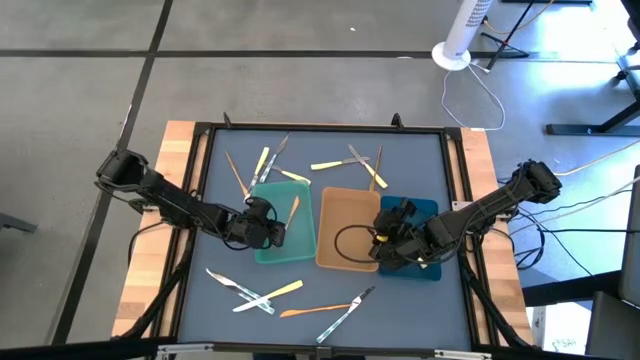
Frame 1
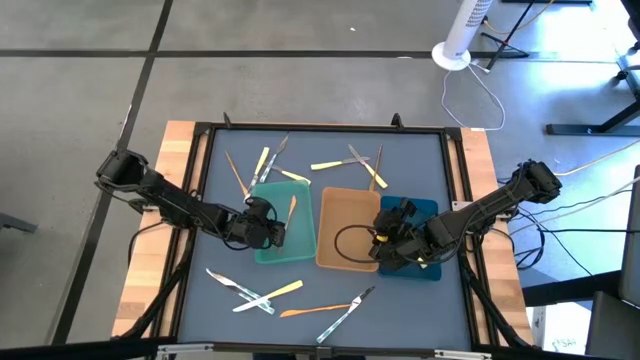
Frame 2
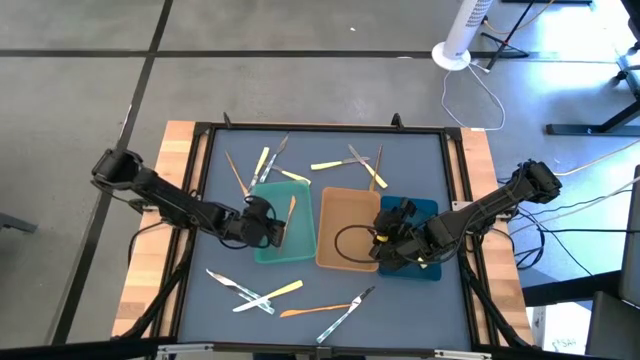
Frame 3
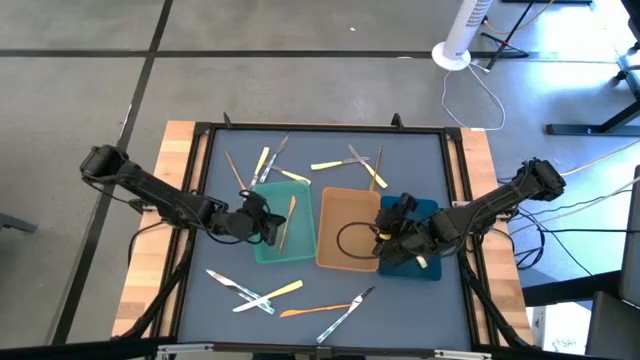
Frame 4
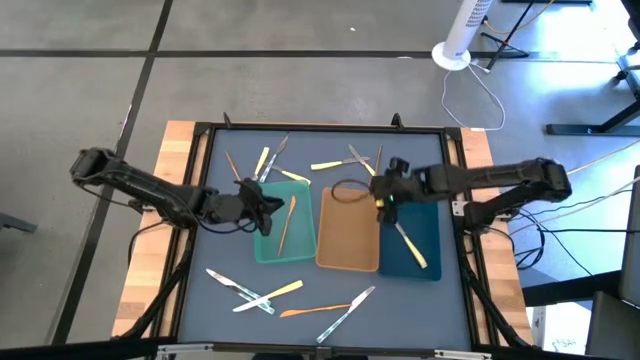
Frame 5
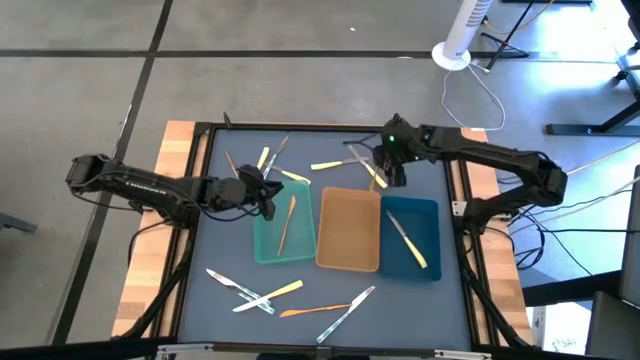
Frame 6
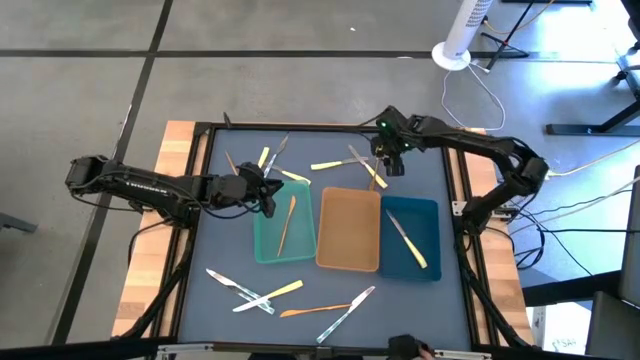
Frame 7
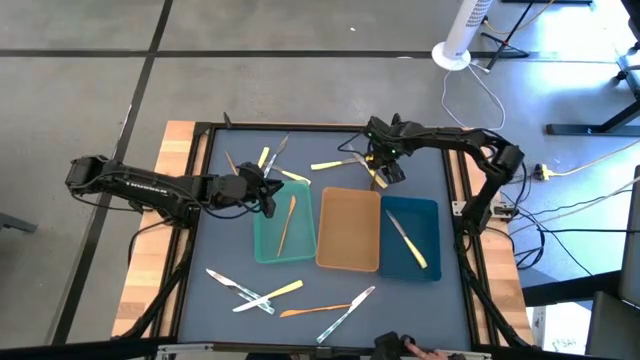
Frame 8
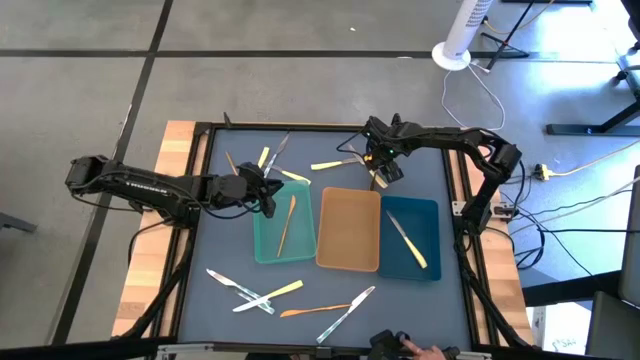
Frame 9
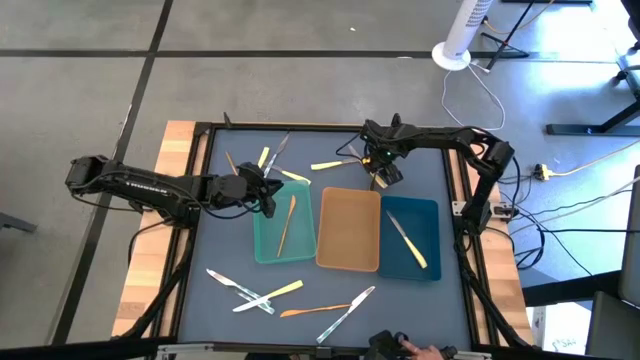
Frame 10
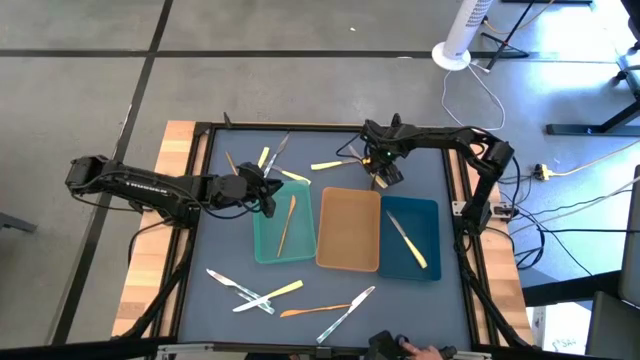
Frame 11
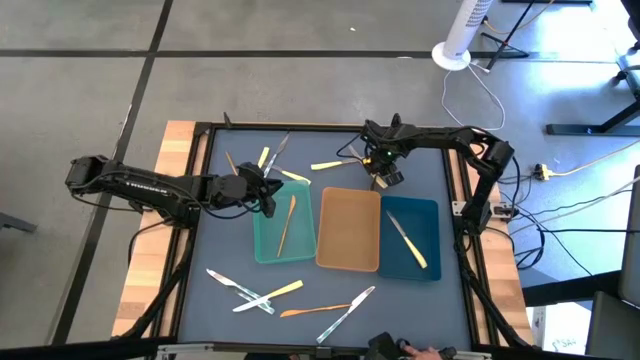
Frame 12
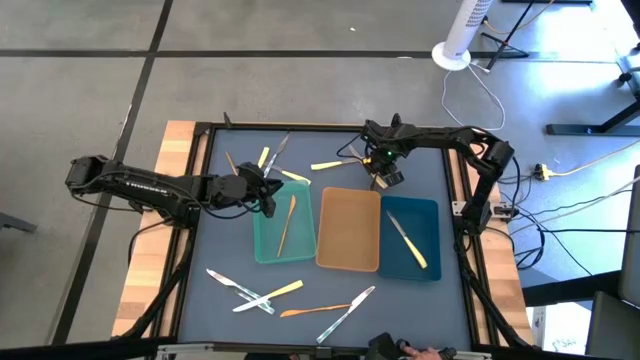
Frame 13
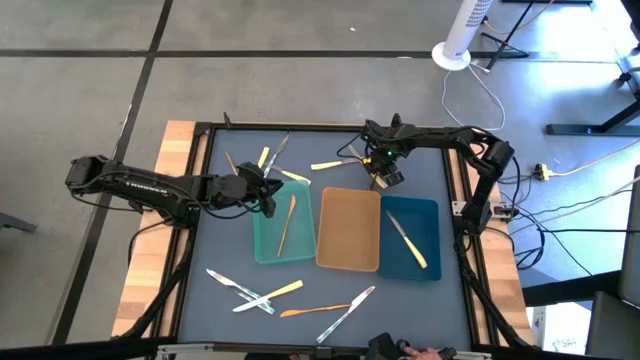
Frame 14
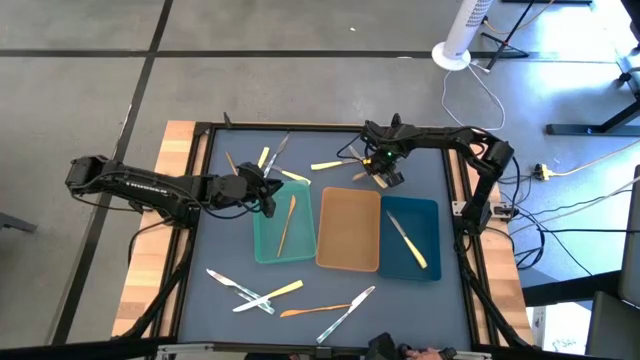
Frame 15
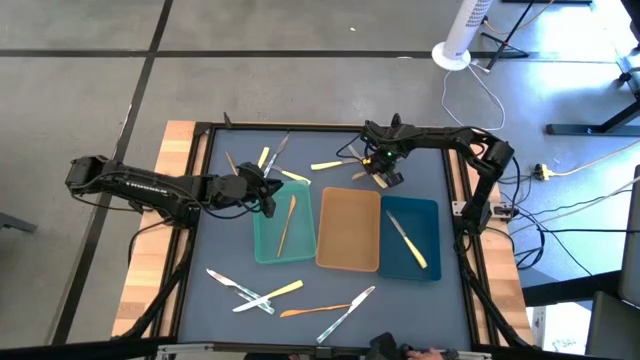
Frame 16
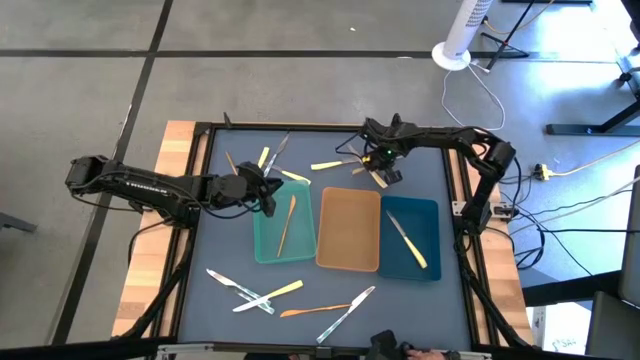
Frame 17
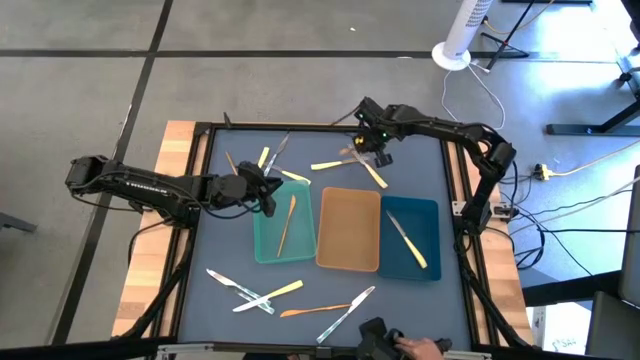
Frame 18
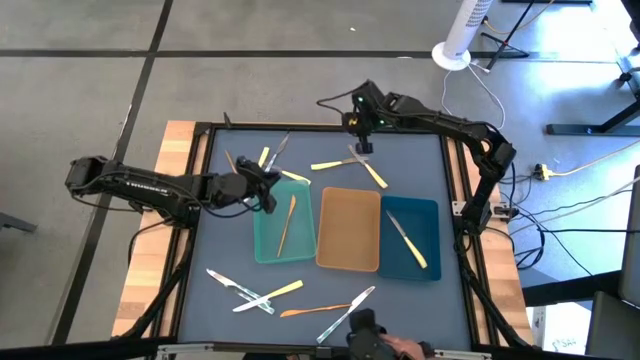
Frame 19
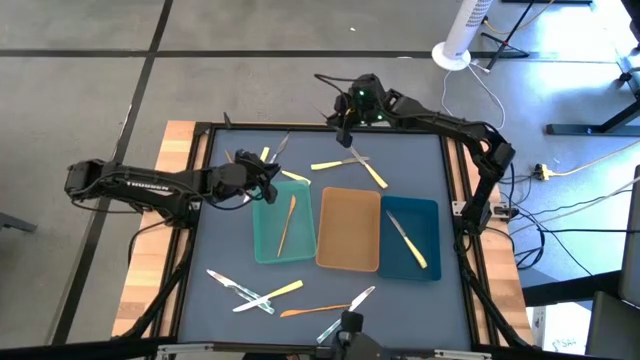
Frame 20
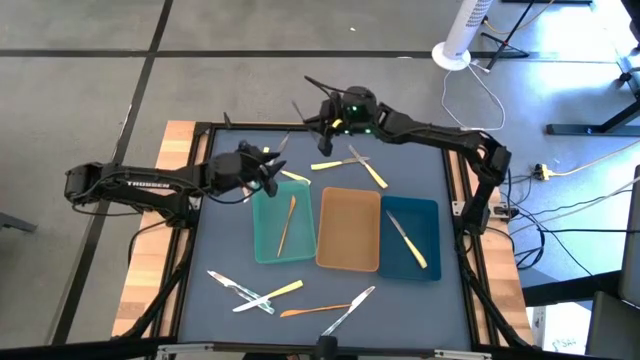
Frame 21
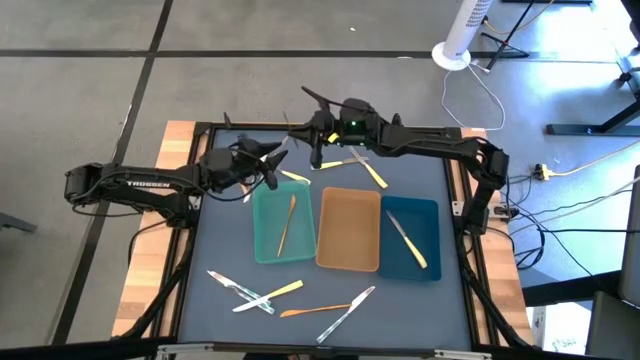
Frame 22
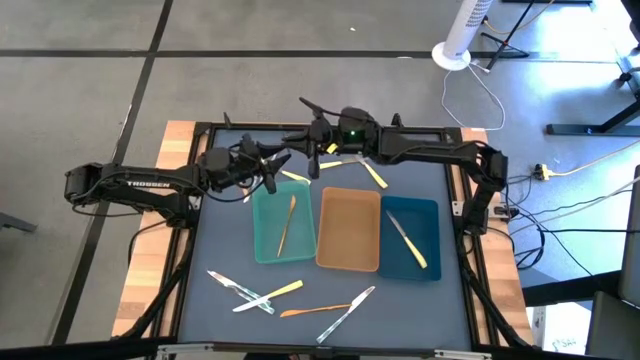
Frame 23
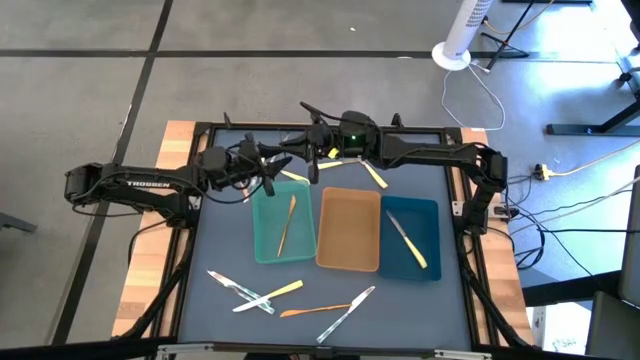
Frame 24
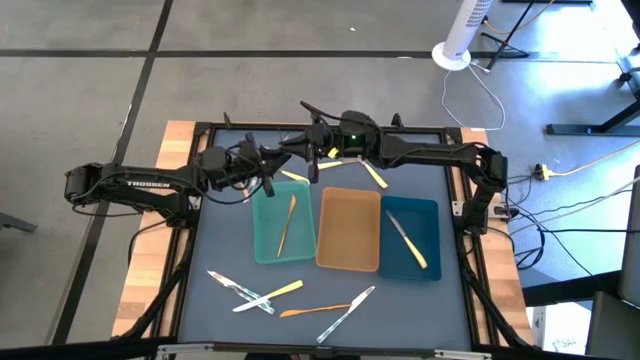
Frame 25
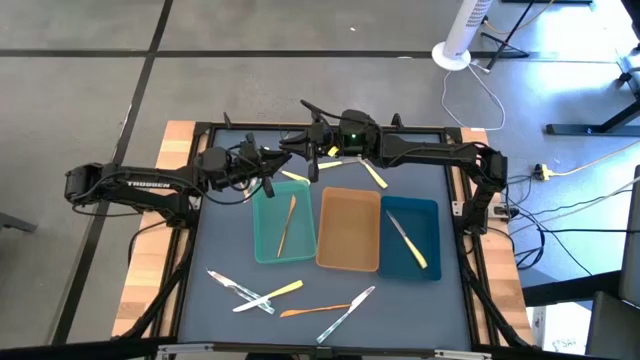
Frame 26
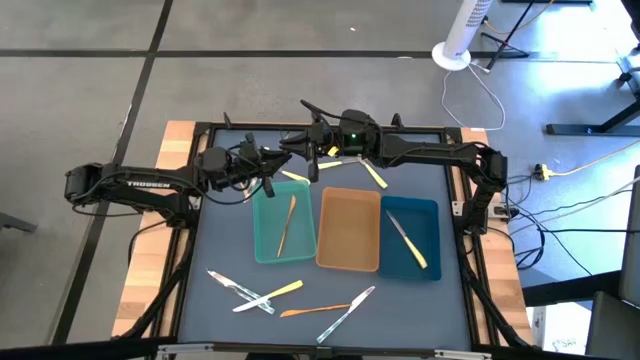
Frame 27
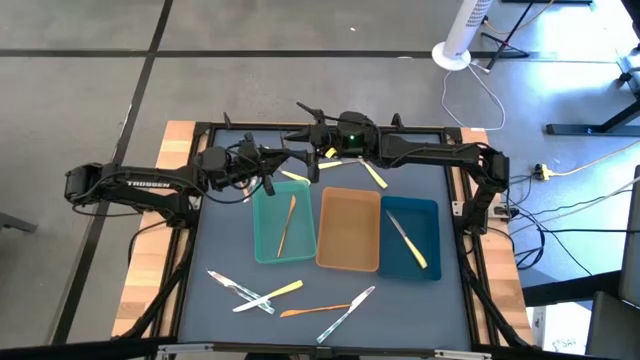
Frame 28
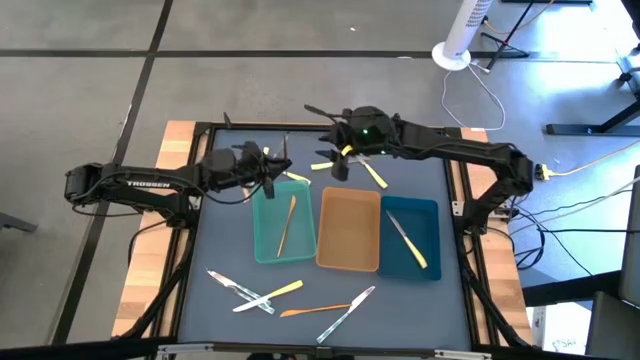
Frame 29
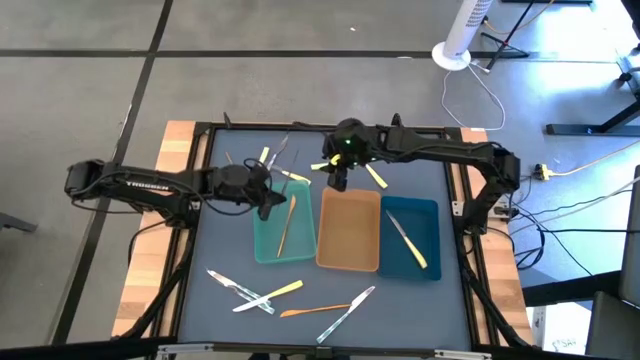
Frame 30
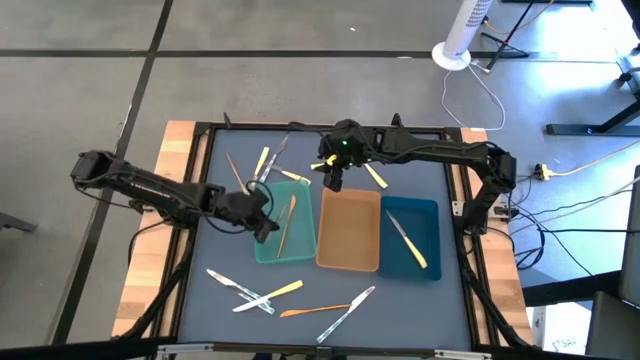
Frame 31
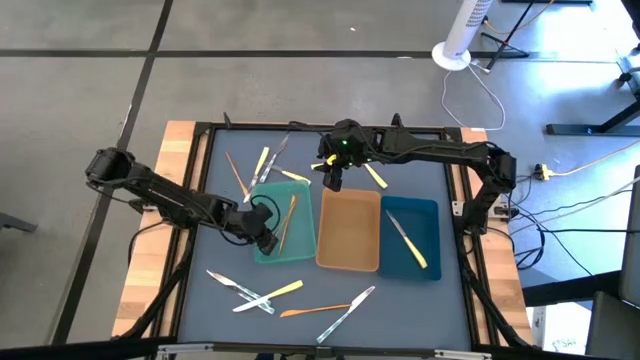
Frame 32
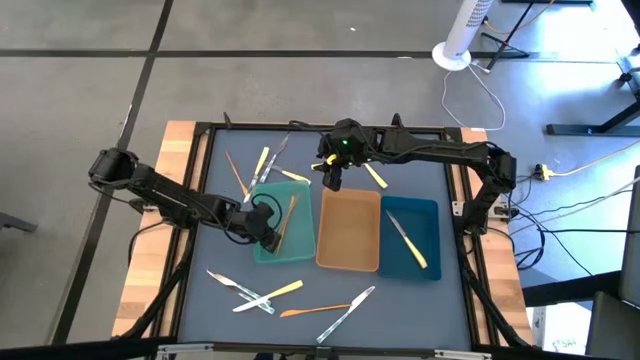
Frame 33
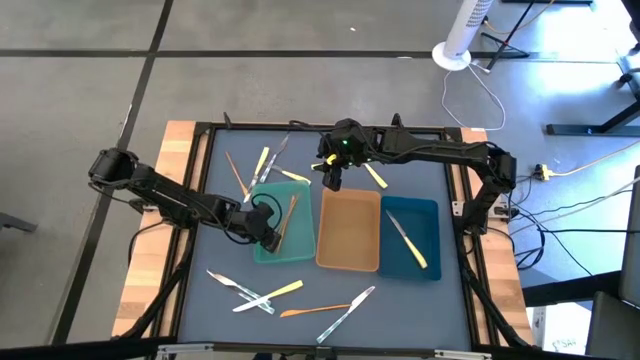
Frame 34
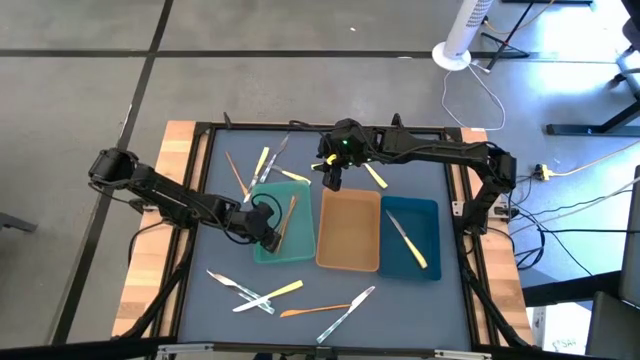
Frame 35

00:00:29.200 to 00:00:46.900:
Task: Sort silverware by color (type)
Put the gold knife into the green bin

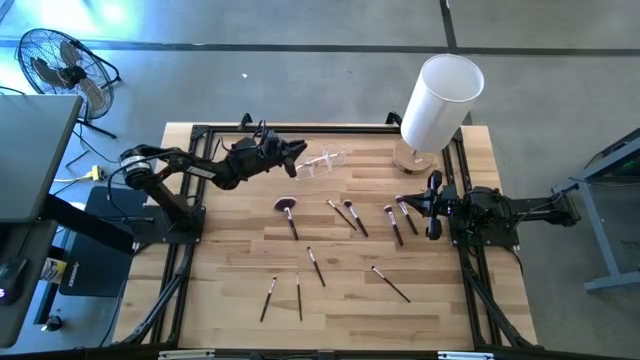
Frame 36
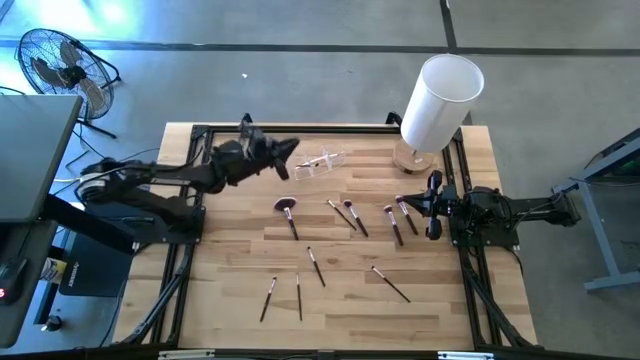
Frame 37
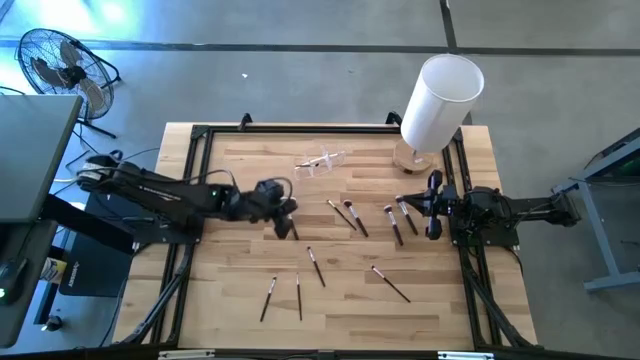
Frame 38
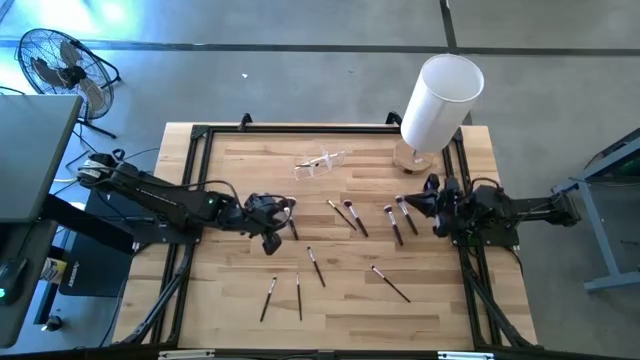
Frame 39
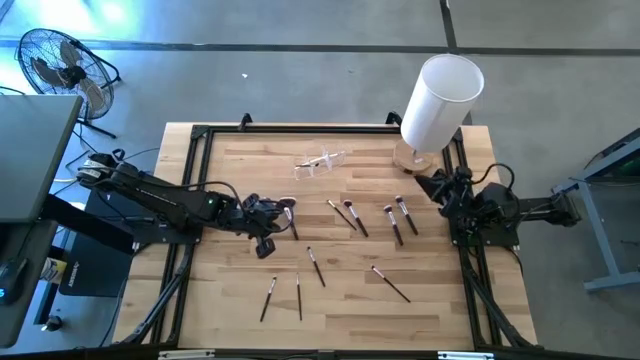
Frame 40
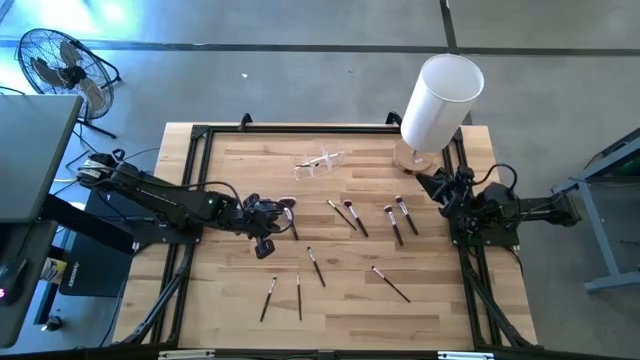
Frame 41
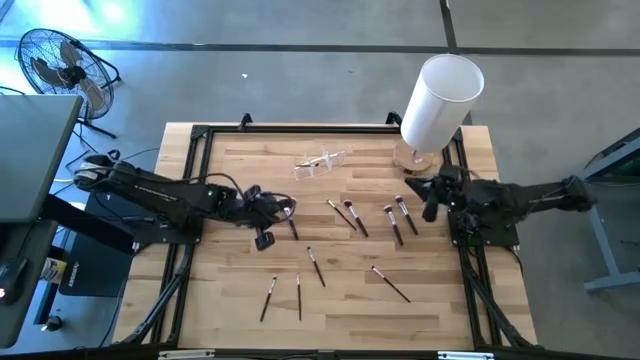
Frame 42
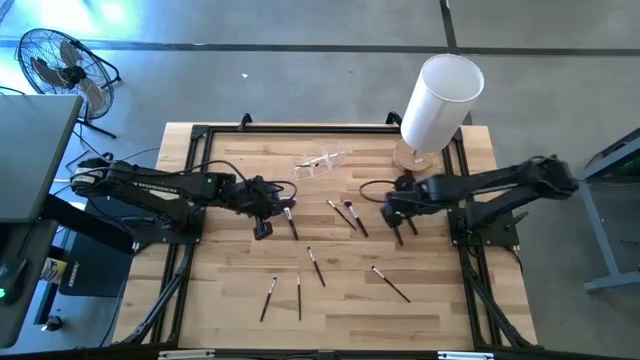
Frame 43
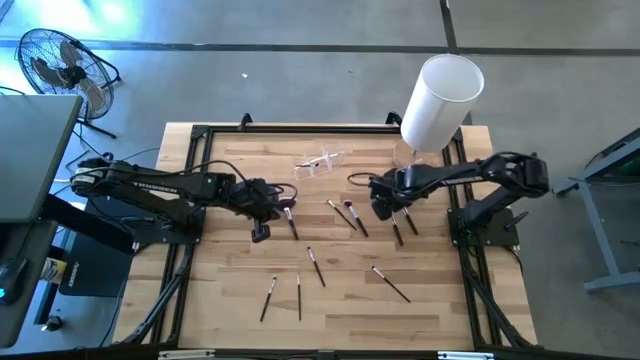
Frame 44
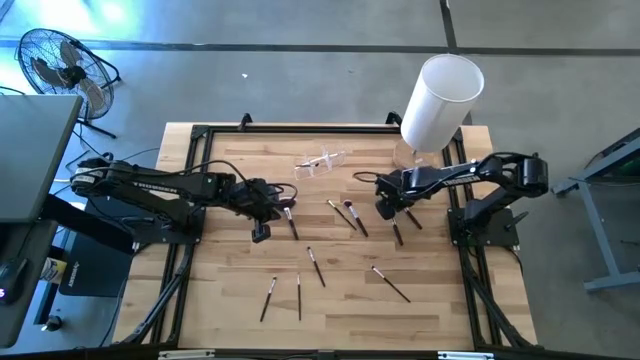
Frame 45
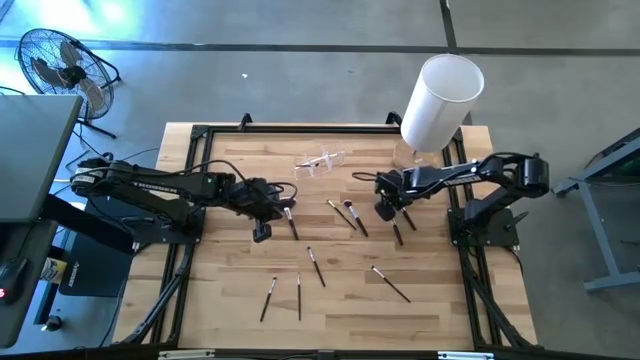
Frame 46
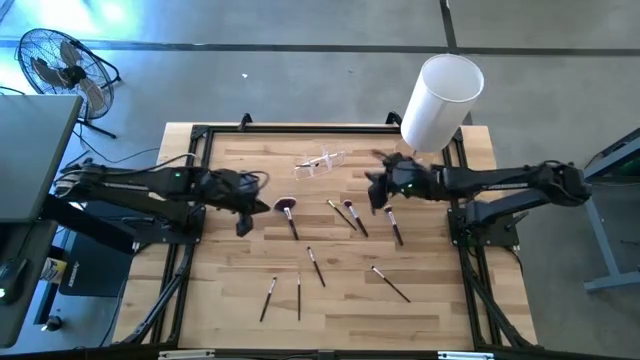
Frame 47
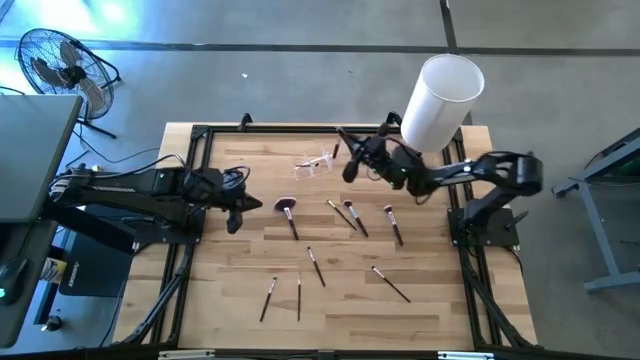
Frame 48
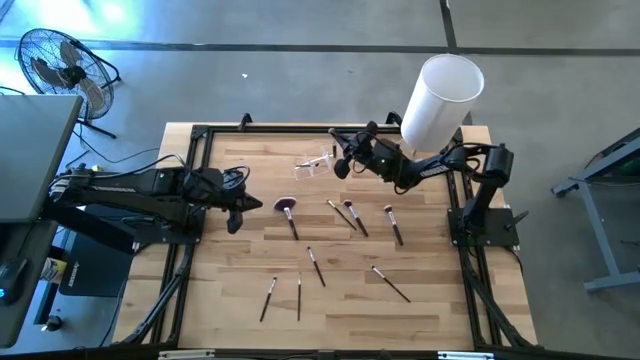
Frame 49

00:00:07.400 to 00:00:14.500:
Task: Put items in baskets/containers
Put the black powder brush into the transparent organizer
